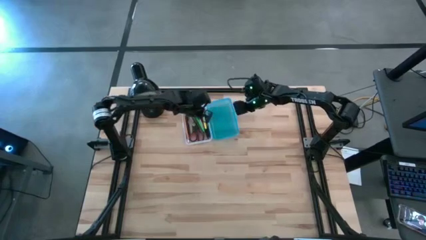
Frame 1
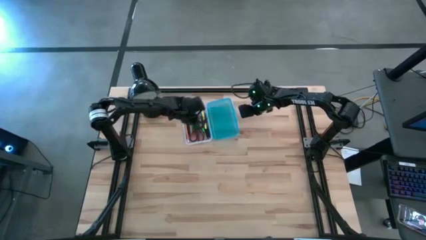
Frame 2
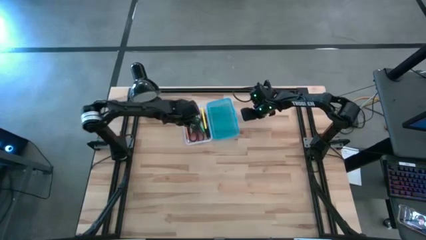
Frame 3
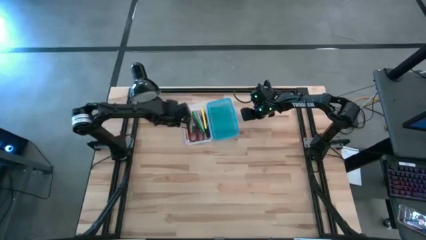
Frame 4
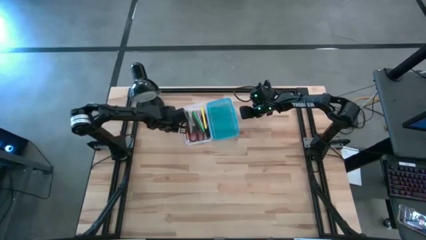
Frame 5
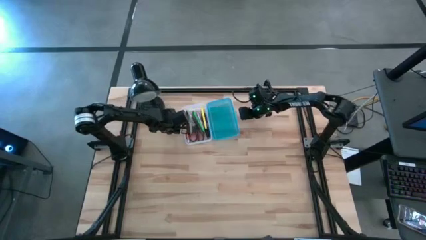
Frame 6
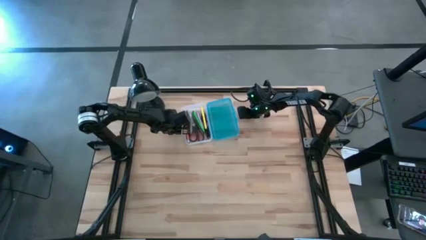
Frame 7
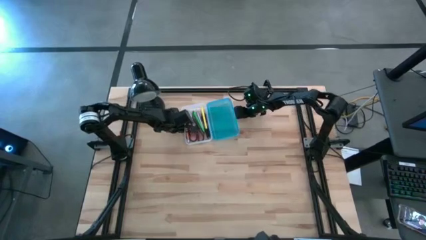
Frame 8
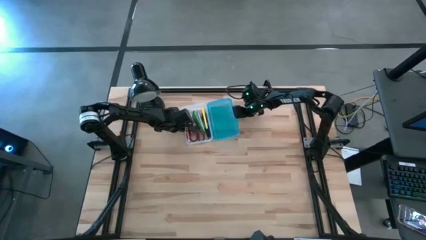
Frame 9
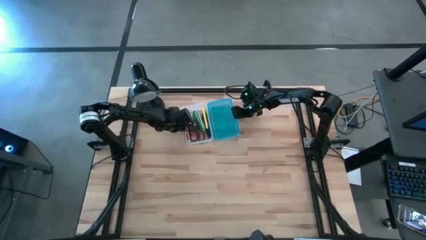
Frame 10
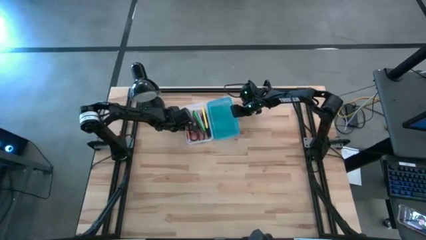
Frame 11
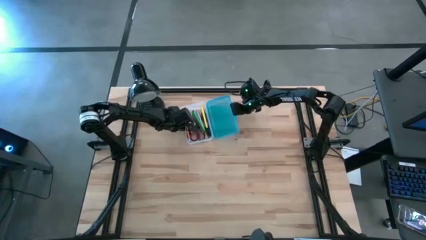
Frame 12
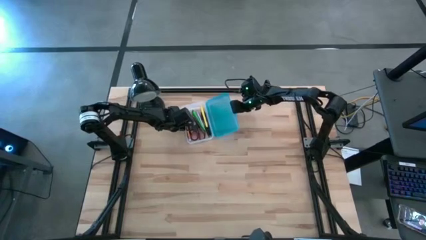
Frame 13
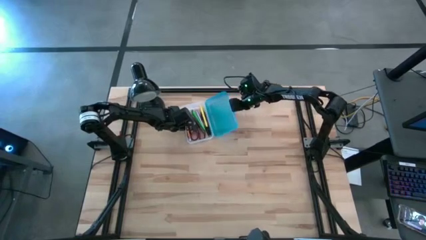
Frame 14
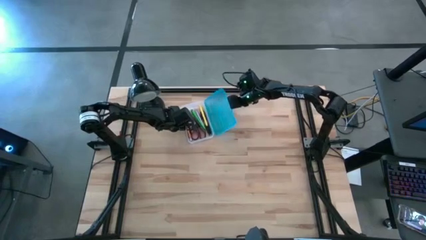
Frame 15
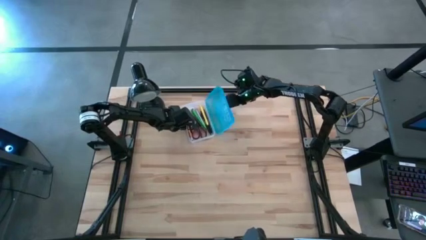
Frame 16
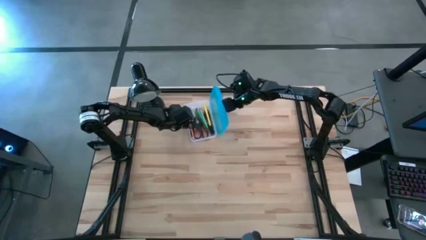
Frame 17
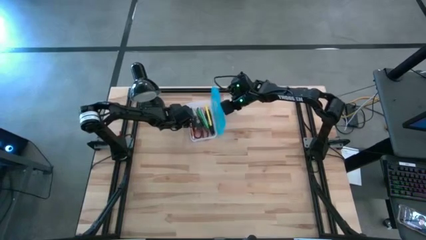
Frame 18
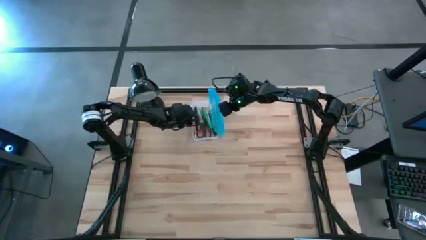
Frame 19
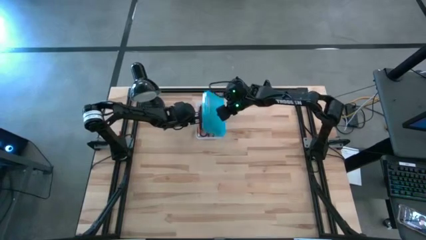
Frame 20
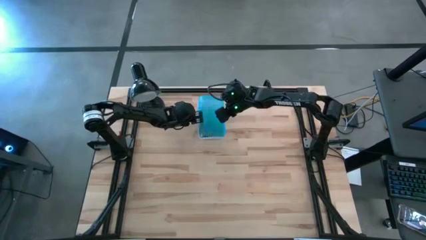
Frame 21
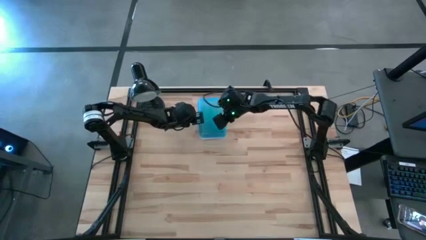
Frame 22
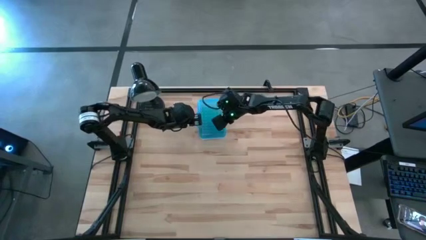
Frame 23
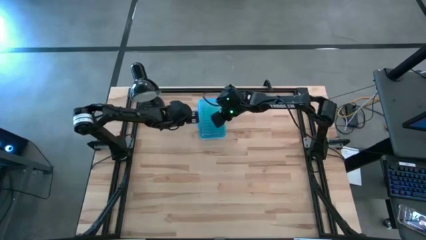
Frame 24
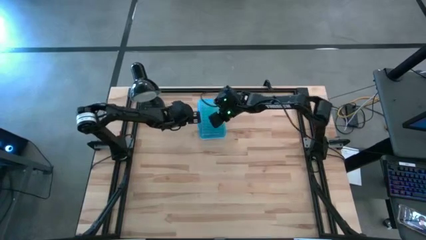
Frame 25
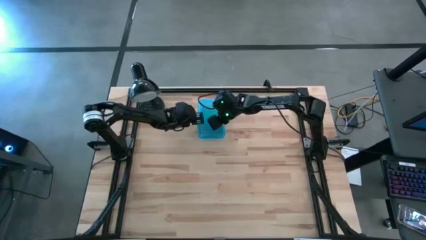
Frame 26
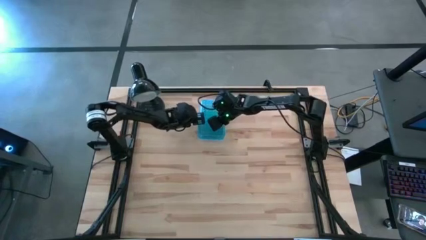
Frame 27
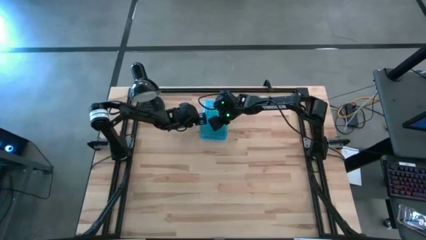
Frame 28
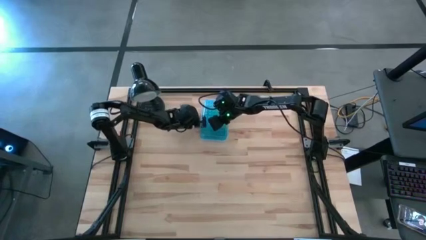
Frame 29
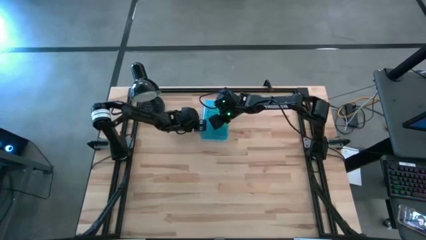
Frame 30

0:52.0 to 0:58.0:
Task: Pick & place school supplies into a supply box
Close the blue supply box

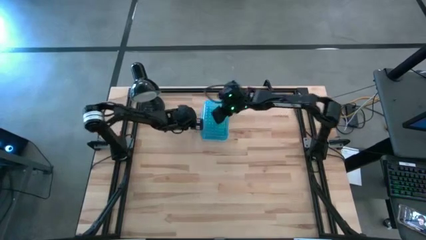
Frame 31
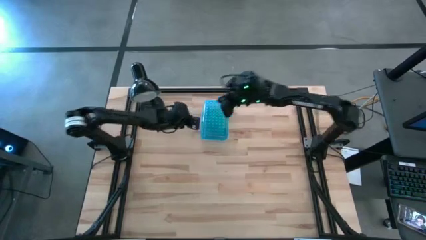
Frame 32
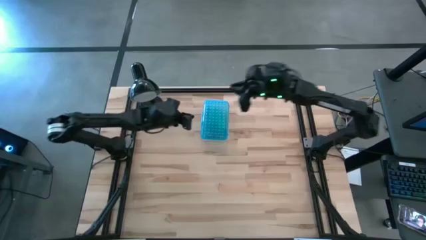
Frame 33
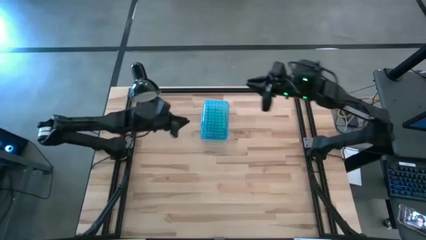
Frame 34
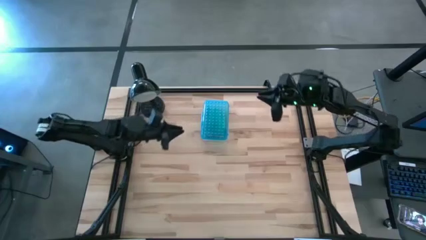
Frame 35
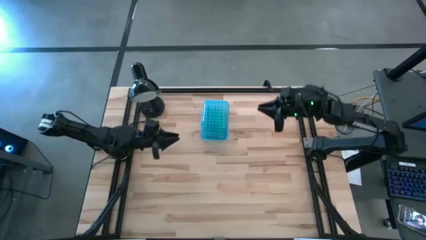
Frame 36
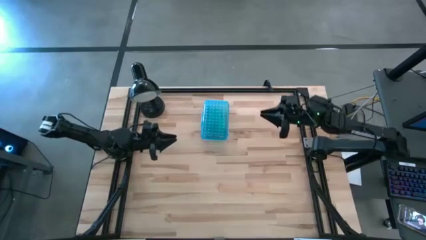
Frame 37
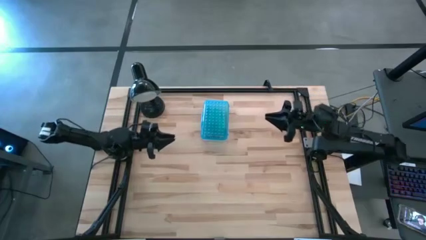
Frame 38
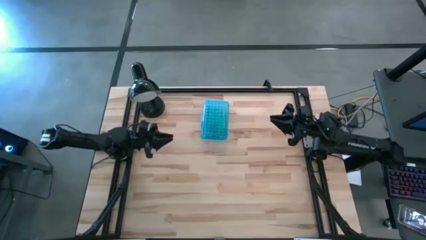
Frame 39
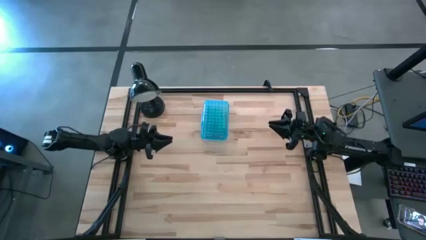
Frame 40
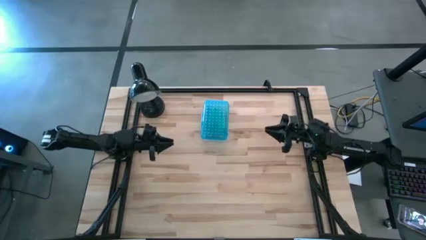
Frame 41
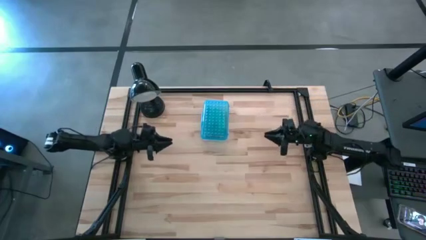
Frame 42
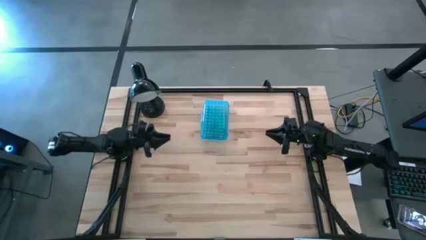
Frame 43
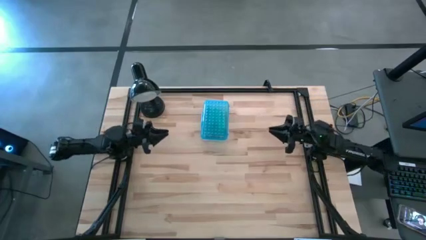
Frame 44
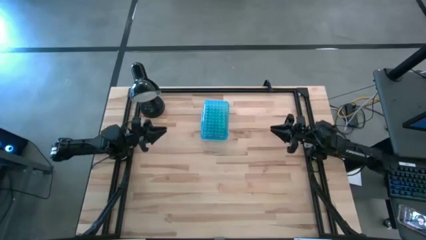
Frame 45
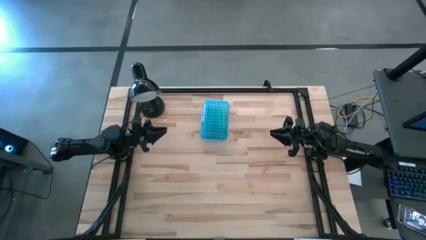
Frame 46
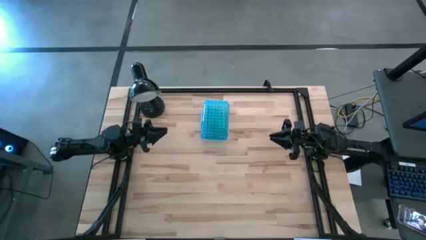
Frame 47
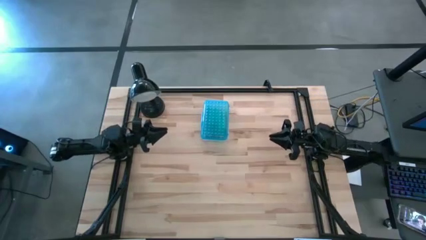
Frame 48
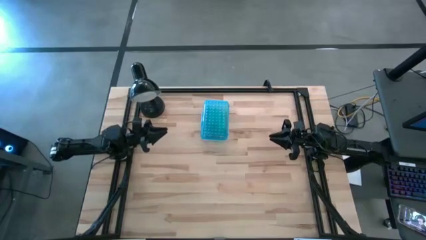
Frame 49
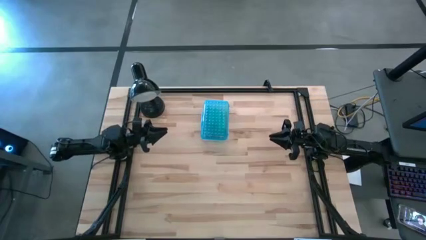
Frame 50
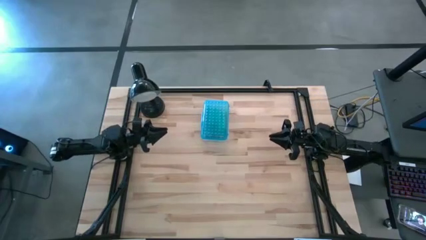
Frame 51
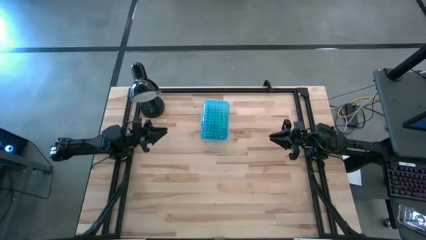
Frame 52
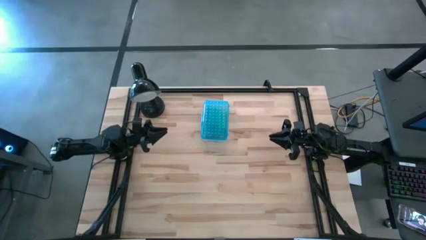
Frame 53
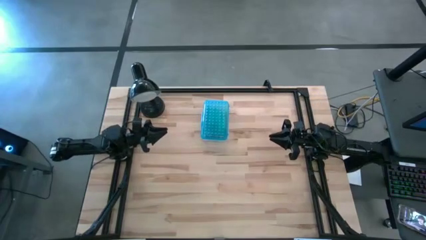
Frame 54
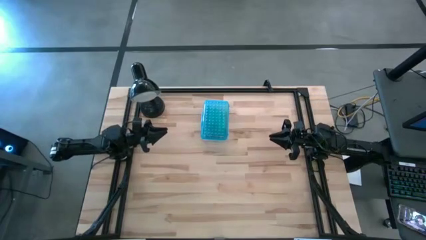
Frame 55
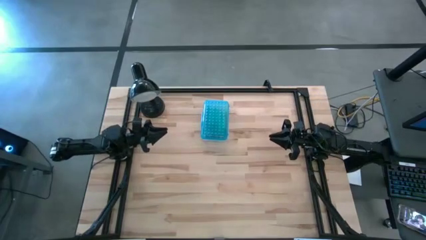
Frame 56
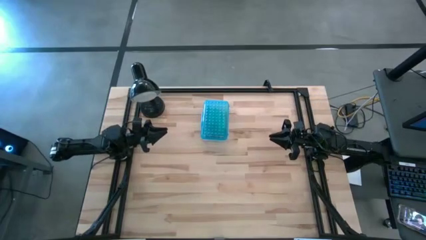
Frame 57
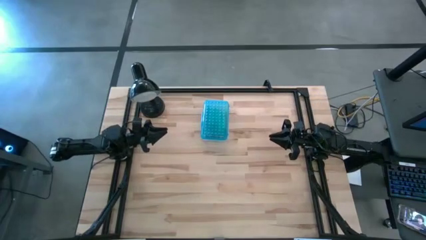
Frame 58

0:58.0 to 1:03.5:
Return to Home Position

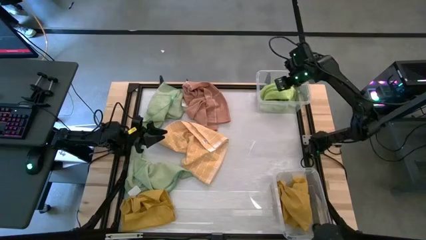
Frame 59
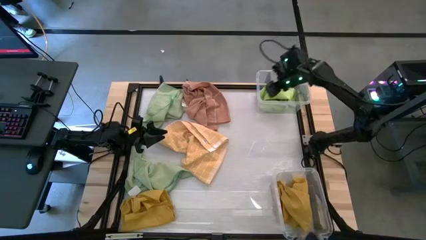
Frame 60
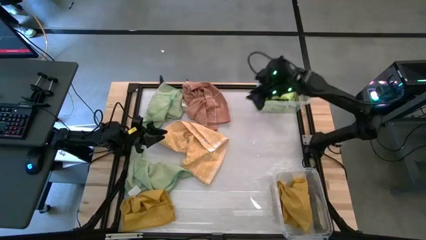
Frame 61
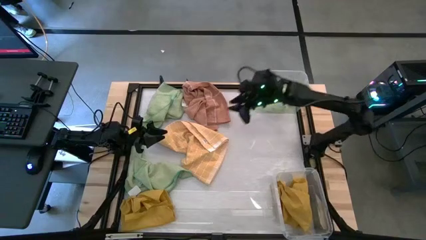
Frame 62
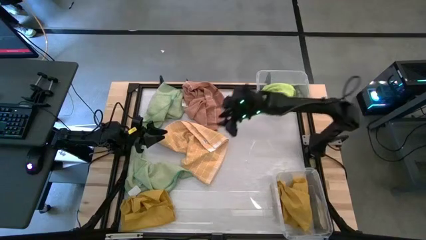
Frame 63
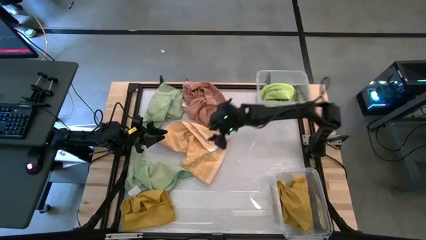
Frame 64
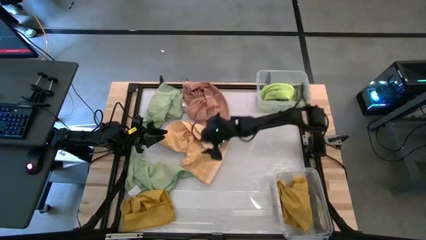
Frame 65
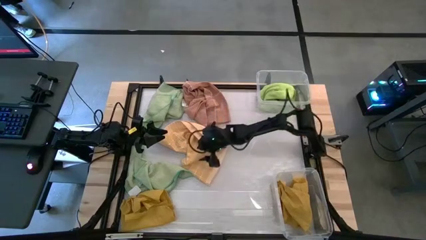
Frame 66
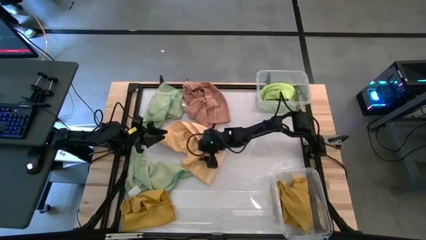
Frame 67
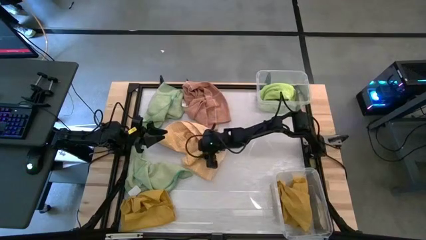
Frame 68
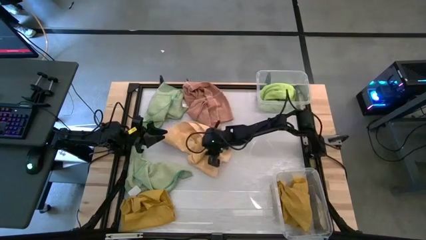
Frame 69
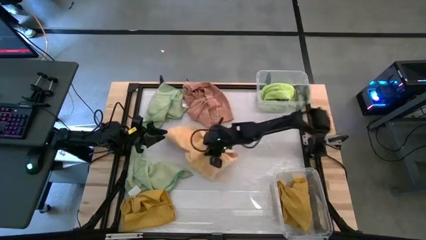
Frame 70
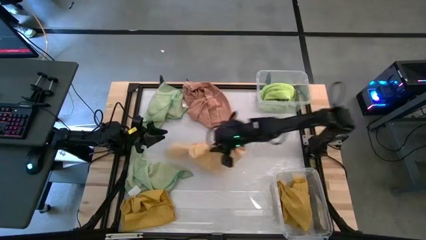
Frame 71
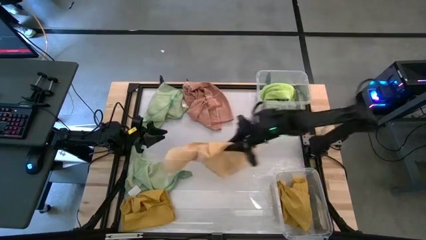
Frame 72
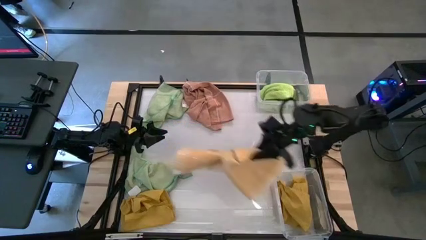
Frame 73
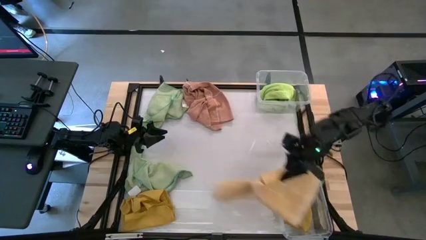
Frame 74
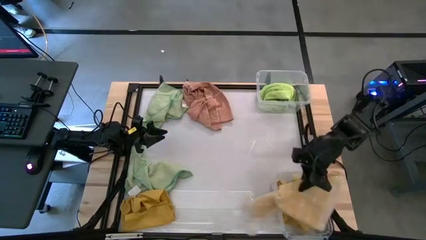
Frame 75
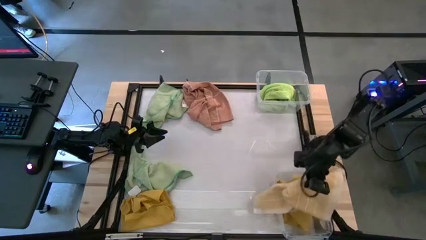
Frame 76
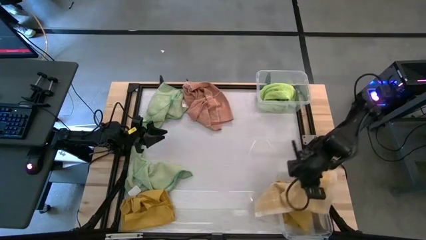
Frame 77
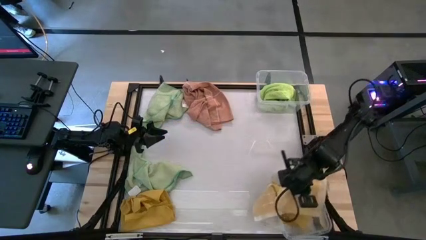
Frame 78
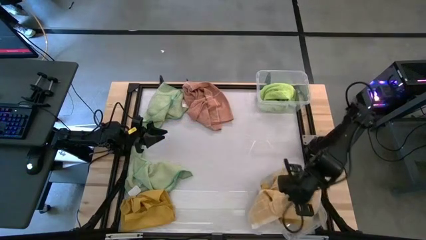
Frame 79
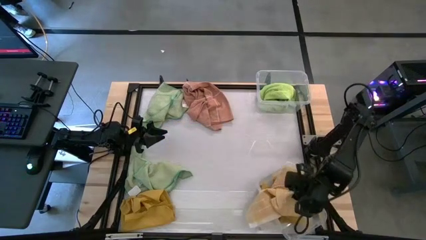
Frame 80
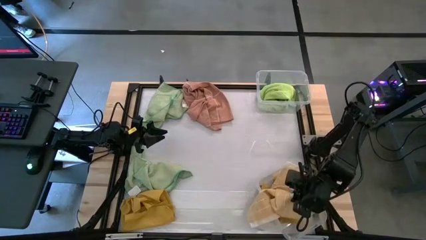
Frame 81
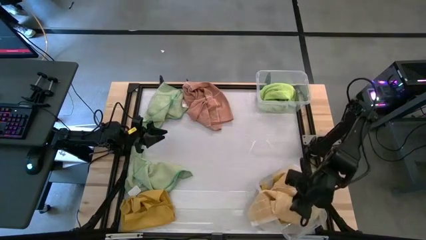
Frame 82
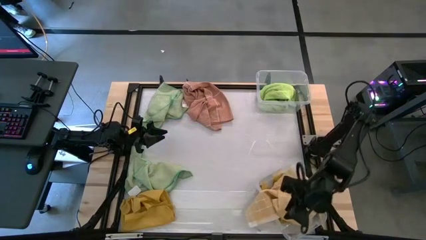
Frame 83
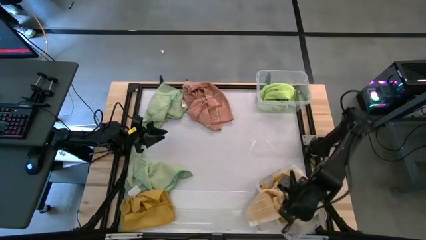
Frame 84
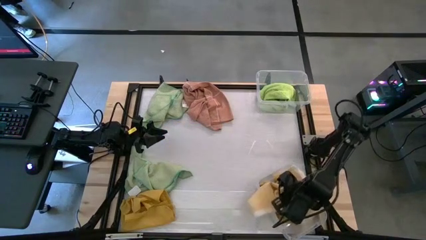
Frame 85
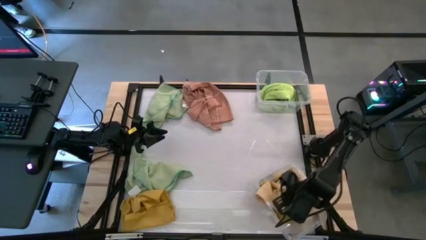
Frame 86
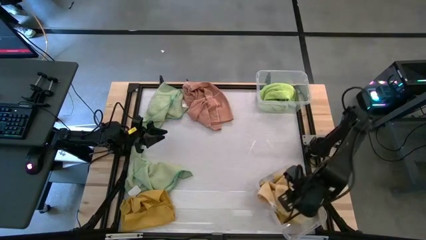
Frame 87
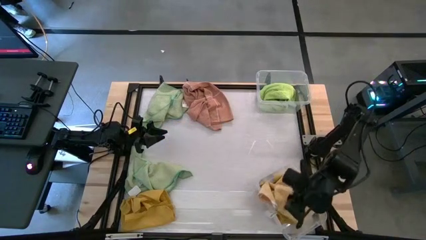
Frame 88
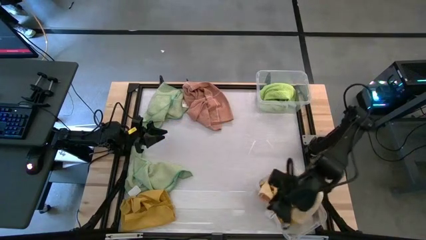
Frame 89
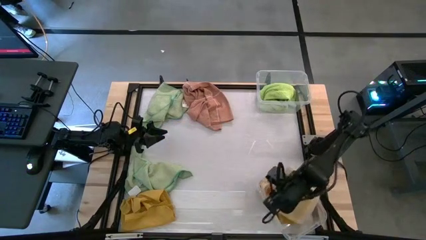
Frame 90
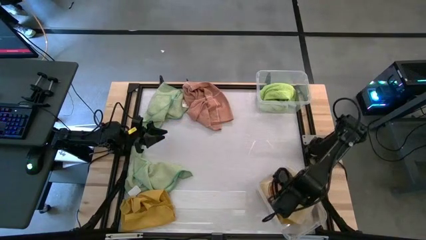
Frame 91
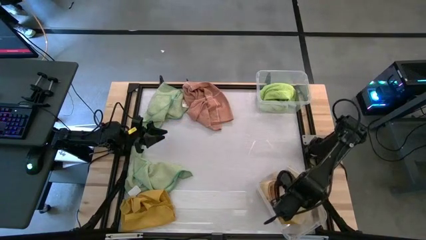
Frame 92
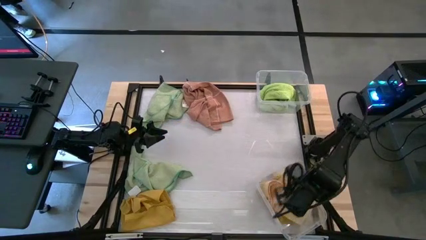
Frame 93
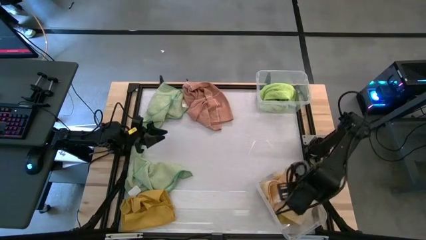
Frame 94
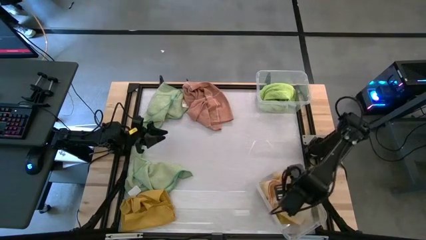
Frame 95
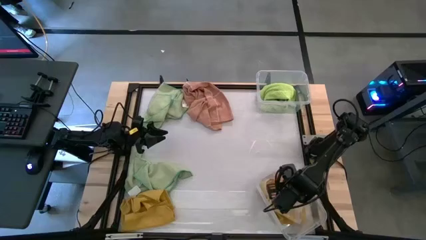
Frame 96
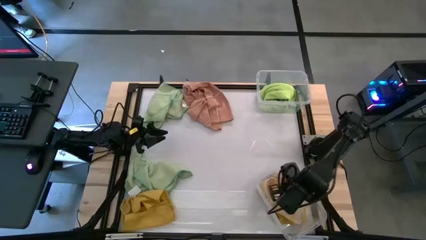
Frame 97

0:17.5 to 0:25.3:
Task: Sort towels by color in basket
Put the orange patterned towel into the bottom transparent bin
